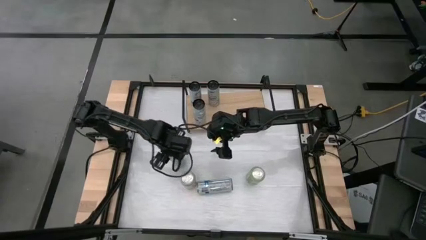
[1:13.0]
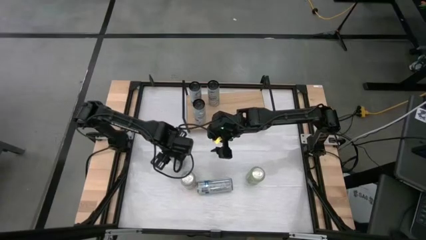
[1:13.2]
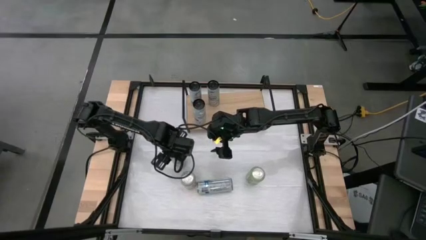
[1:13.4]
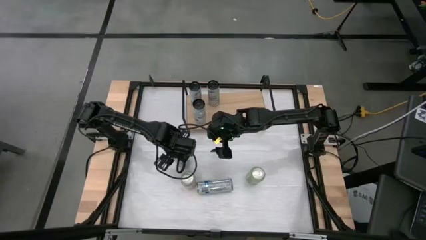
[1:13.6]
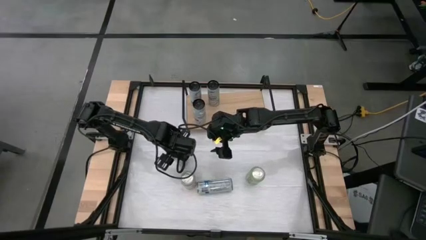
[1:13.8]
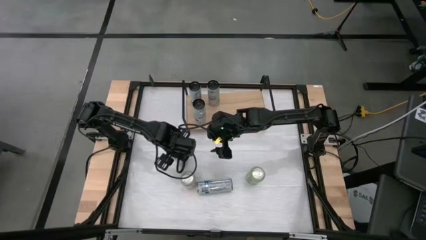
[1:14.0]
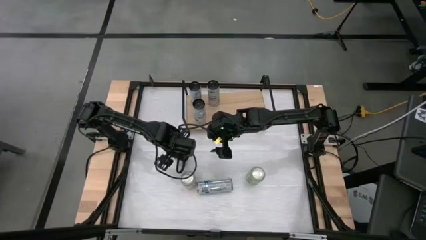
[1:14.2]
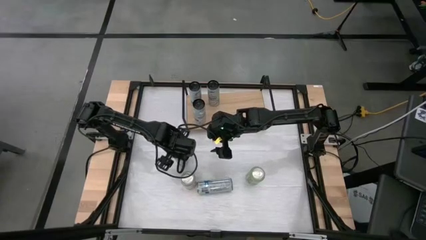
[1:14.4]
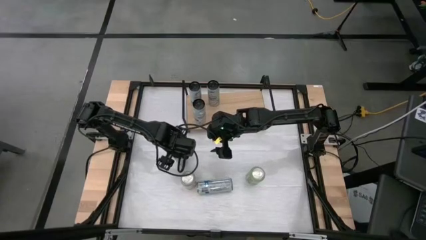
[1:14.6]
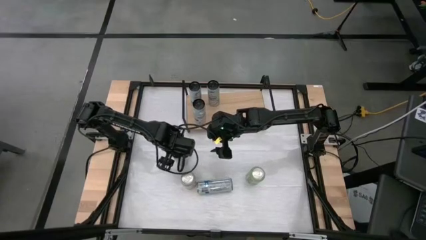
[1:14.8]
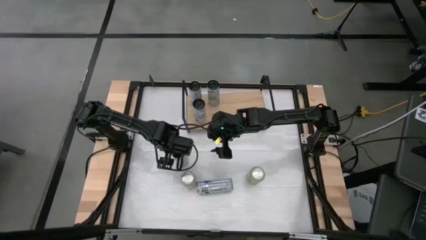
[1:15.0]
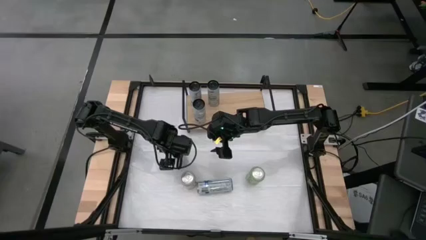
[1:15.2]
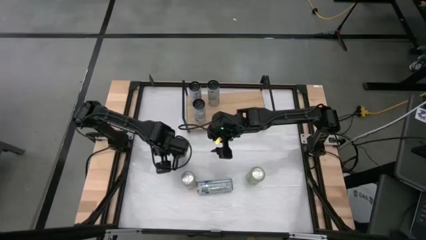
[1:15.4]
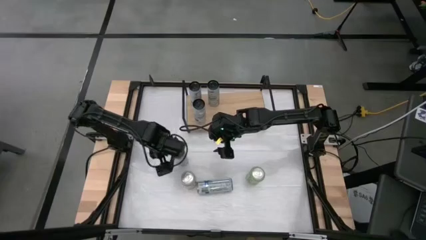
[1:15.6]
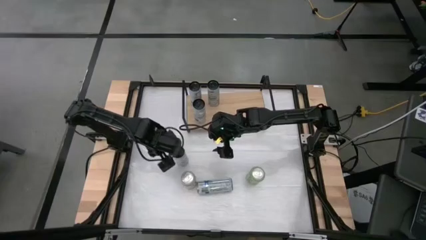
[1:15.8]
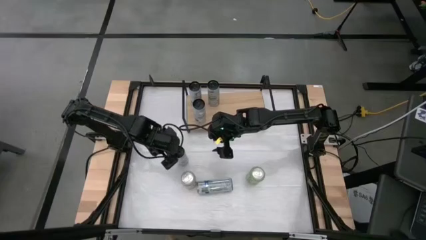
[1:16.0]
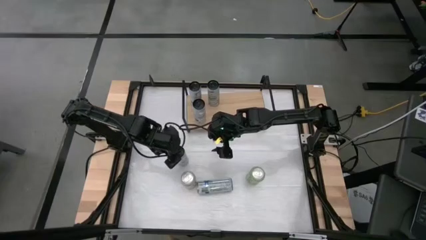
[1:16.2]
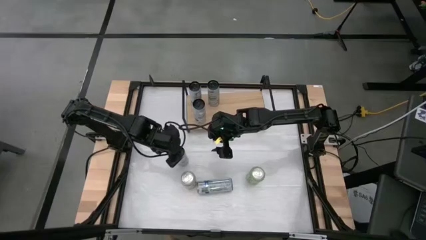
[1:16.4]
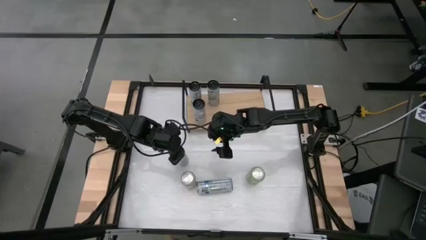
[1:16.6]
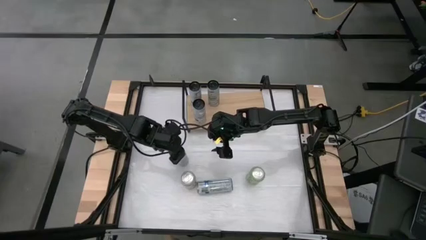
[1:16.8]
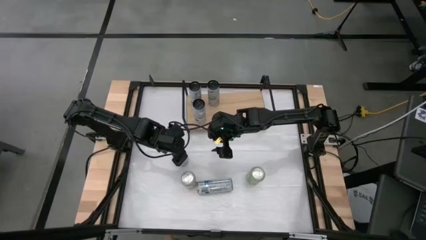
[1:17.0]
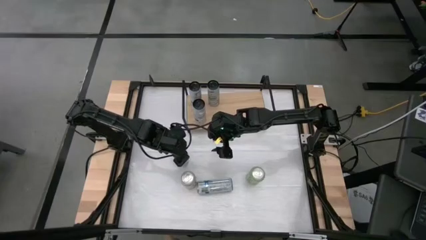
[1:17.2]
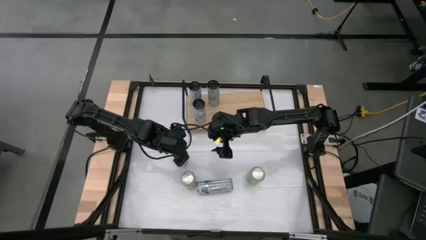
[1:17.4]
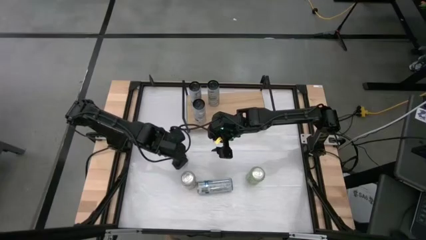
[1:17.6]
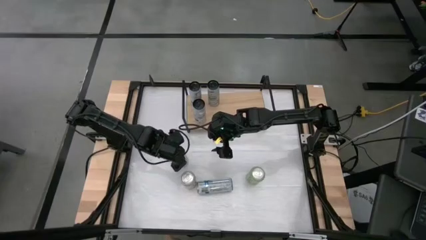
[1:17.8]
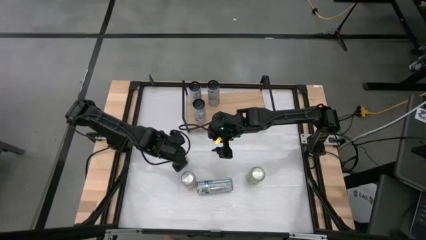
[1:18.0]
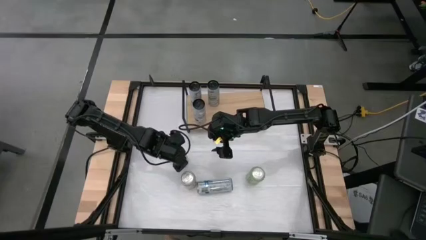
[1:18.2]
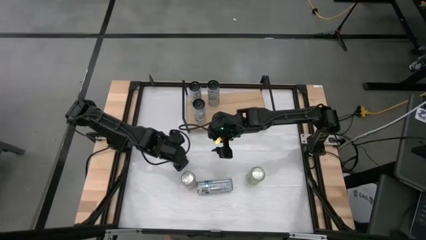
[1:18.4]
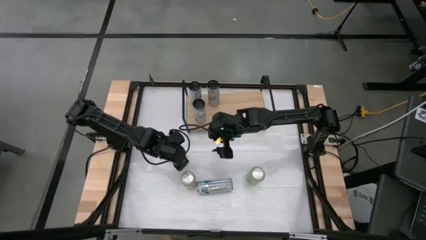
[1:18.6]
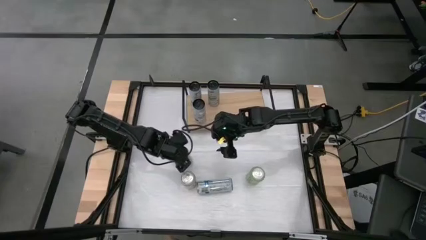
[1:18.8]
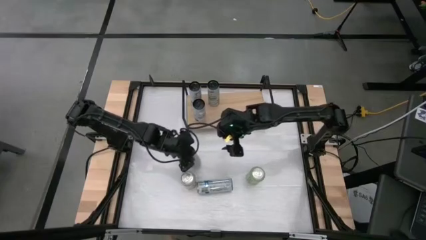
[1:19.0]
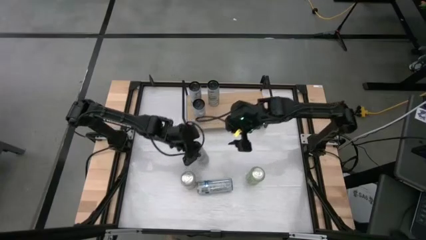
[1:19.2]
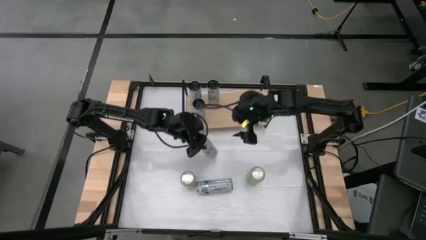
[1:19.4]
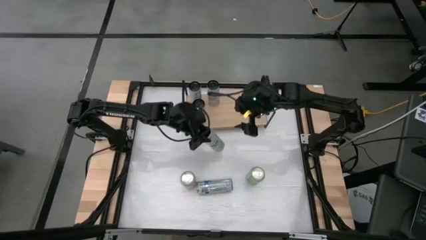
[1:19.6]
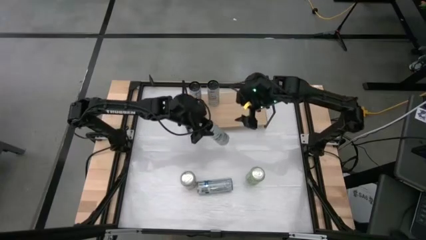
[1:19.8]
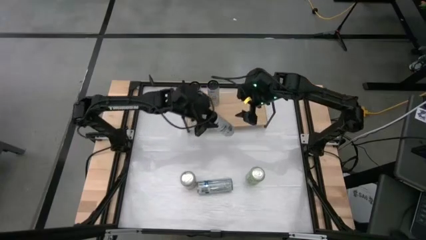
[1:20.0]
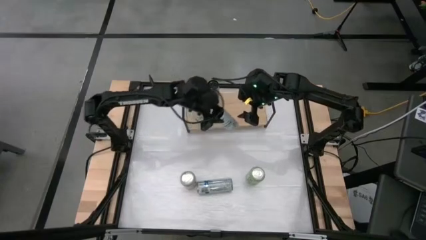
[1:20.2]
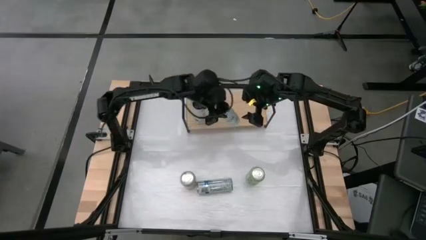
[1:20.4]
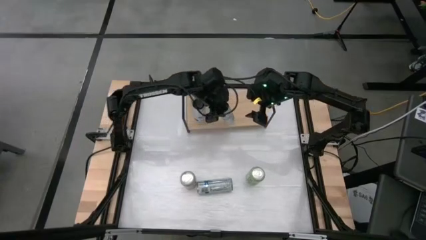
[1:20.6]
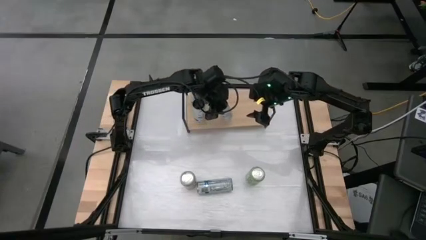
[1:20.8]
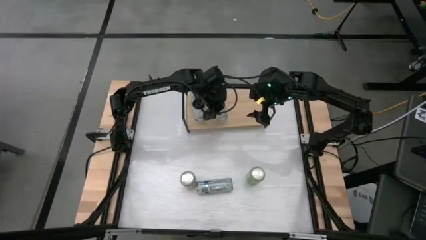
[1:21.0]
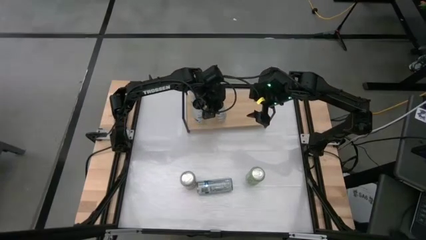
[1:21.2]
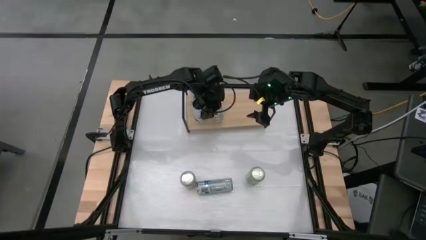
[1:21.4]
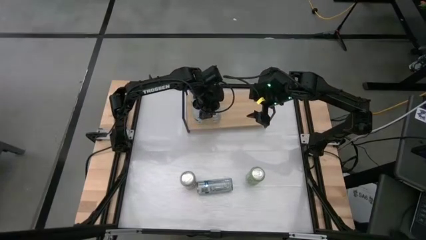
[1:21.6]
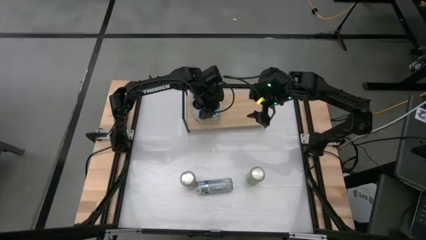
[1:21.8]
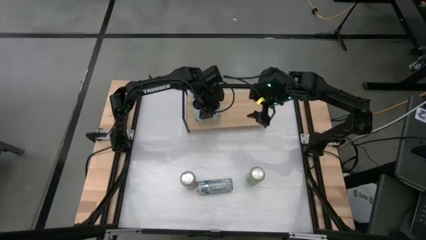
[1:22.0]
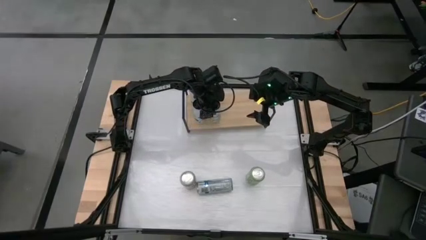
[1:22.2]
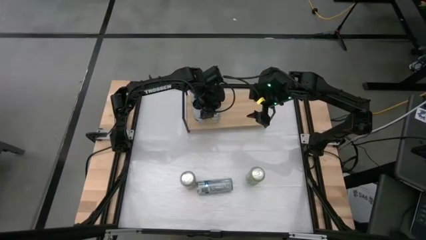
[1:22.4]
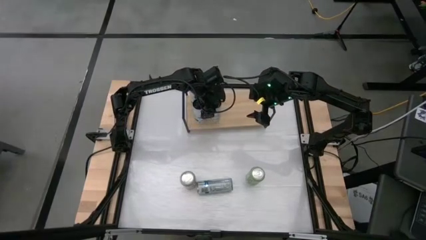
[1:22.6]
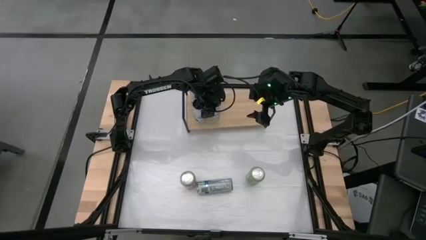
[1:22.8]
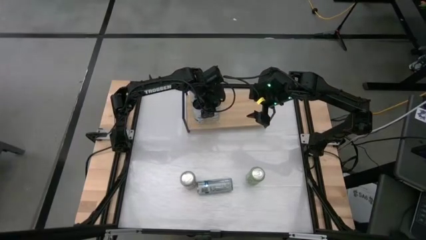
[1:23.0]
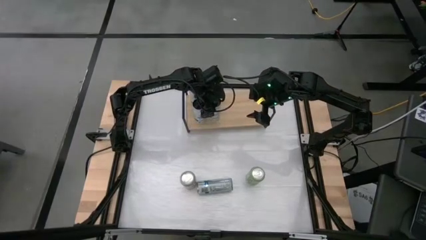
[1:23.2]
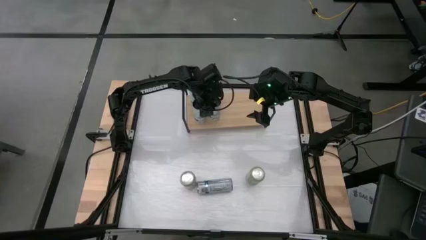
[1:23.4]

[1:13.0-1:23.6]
Task: Place canned beverage on shelf
Put the white-blue soda can aligned with the other white-blue soda can on the shelf

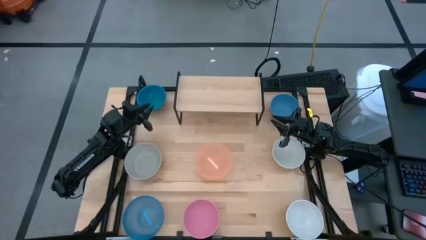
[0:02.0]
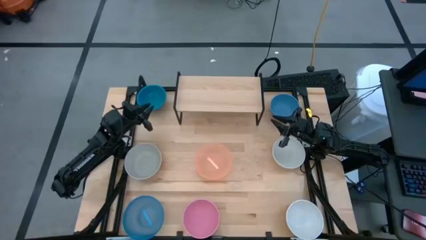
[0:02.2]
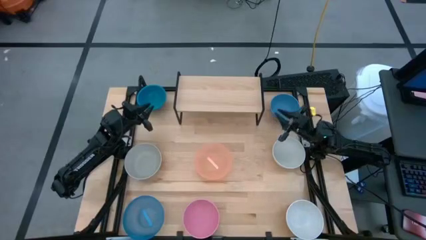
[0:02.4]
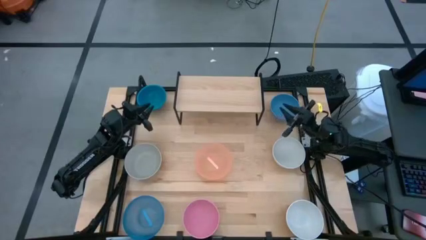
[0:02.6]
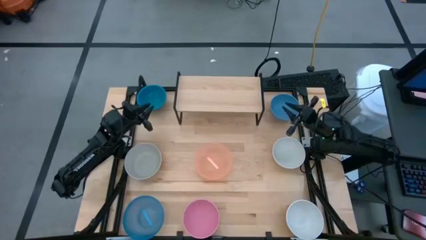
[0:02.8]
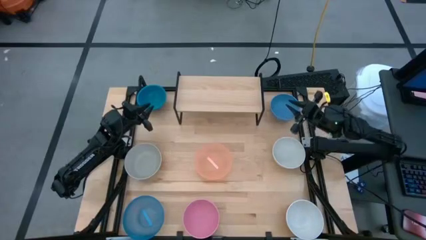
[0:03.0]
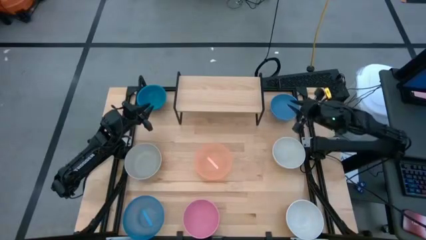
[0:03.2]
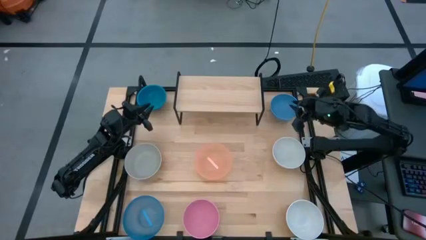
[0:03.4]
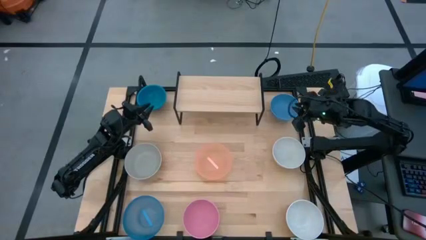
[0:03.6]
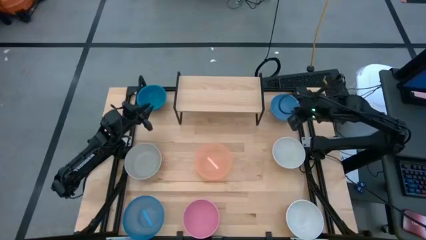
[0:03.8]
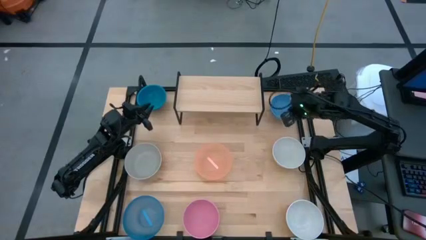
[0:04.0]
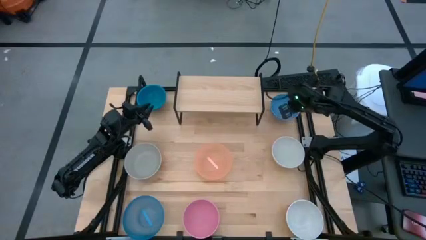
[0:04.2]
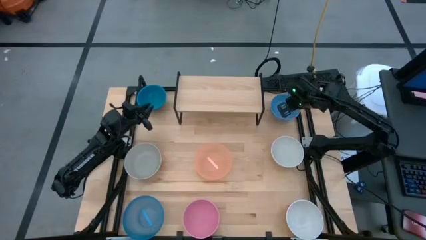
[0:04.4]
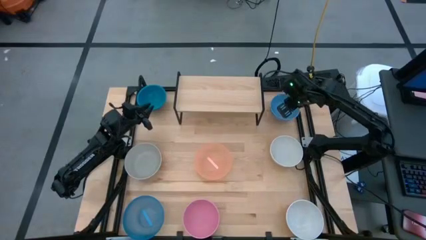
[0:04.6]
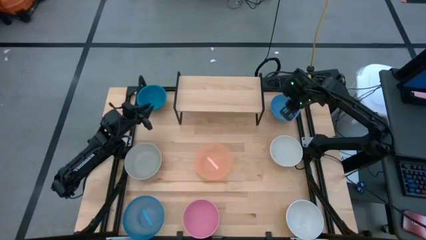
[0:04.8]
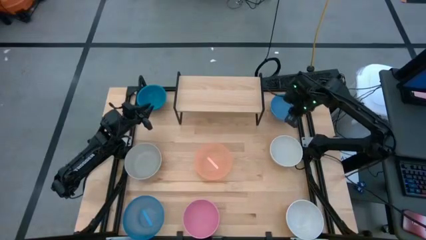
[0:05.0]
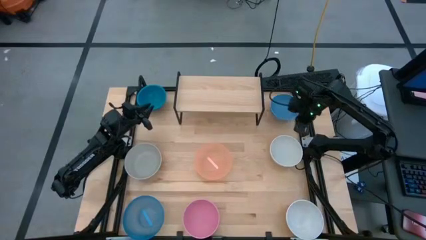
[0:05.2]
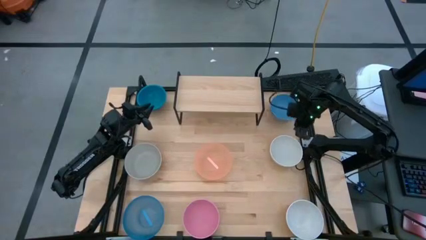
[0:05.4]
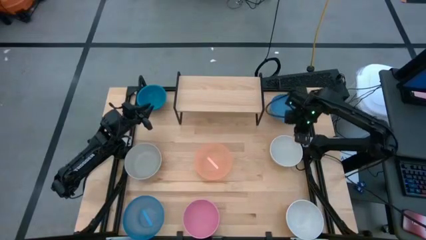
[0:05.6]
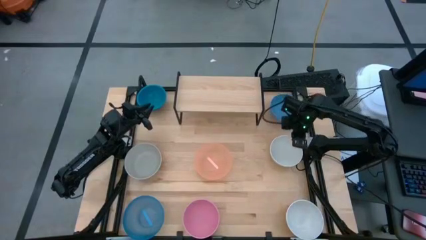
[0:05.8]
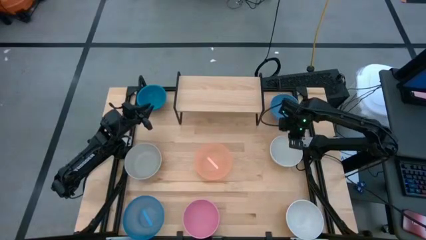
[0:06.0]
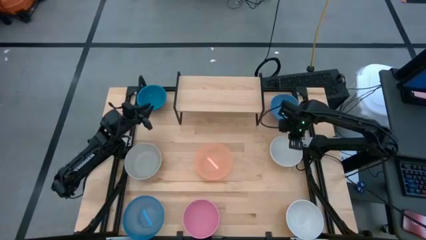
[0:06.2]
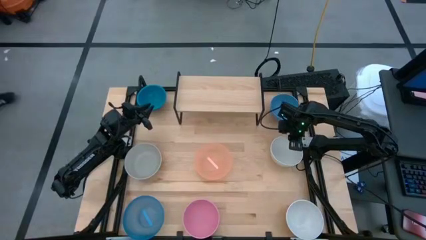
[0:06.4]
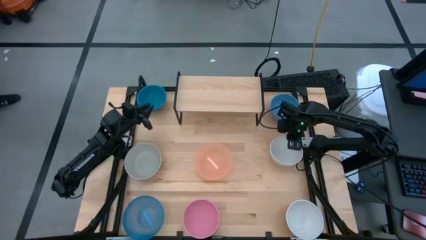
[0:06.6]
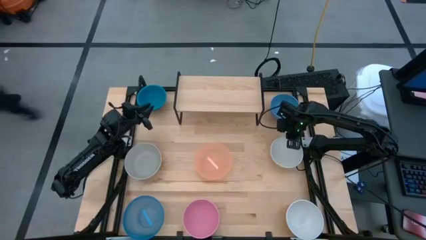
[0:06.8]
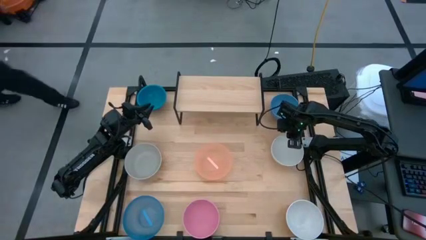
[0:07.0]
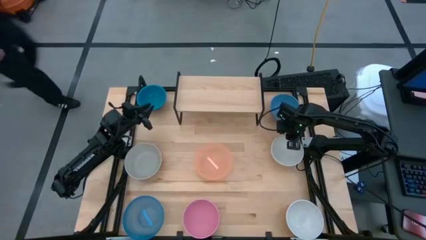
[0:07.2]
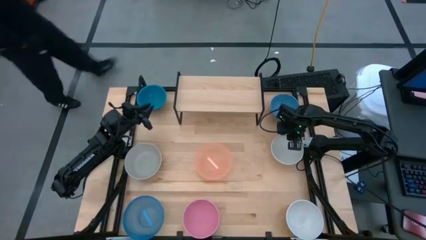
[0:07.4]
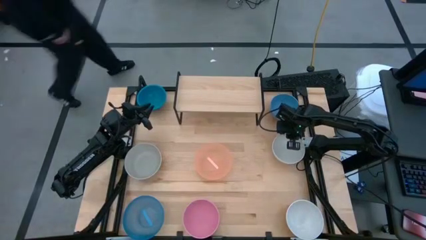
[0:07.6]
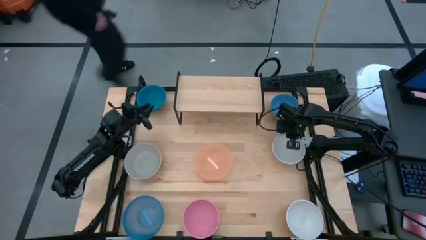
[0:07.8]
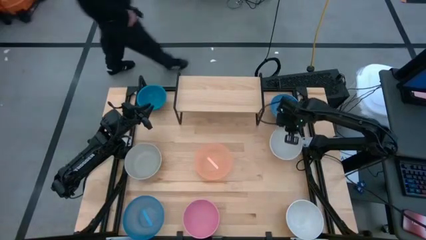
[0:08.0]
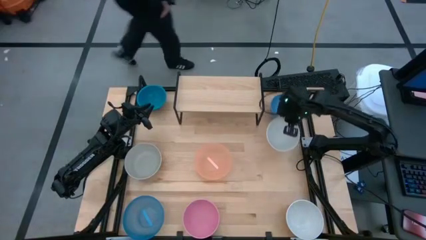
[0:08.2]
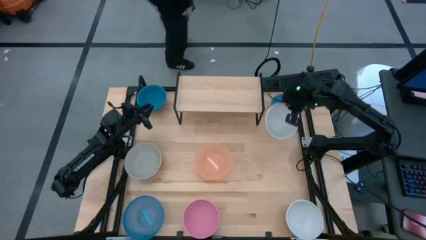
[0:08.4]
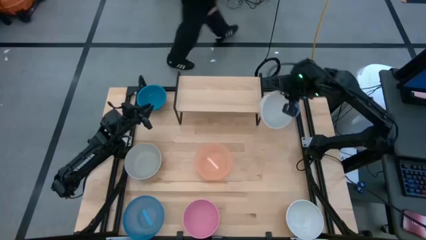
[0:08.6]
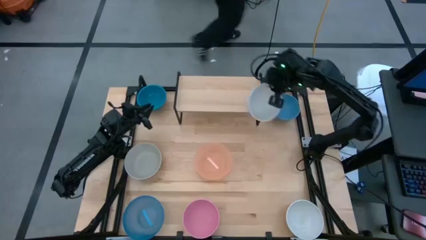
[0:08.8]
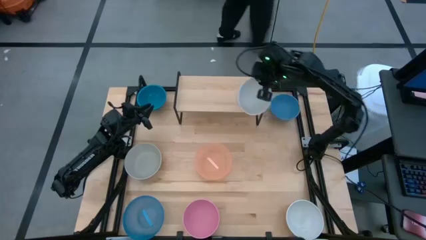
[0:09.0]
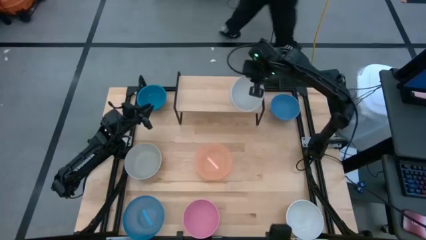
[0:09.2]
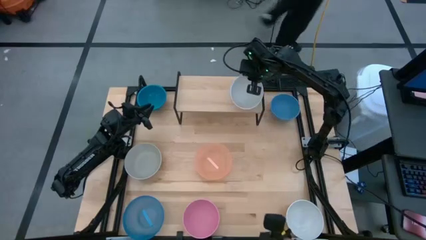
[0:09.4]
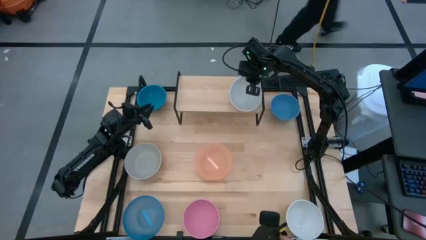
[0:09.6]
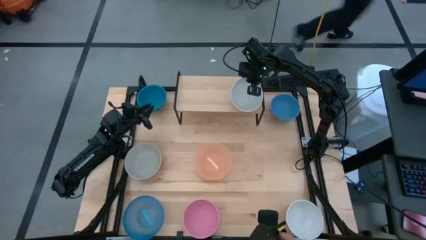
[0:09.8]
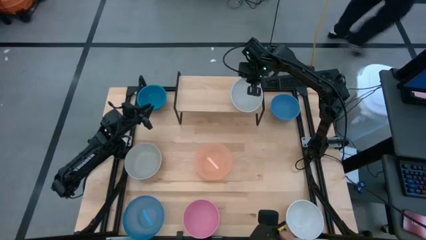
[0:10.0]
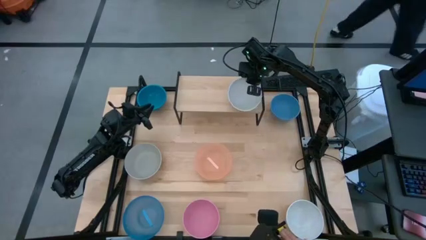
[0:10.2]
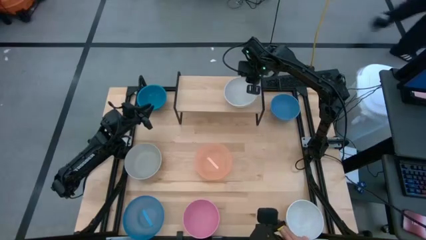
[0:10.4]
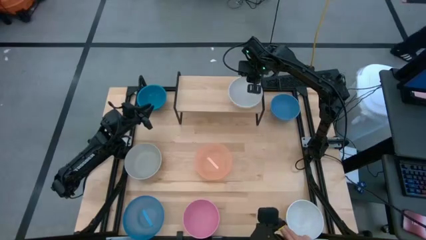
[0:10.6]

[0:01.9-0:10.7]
Task: Place and stack bowls onto a shelf
Put the top white bowl on the shelf
